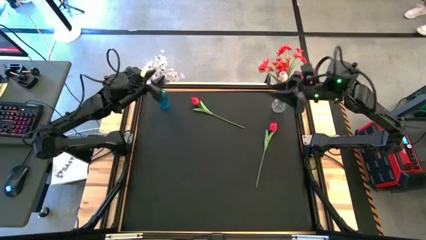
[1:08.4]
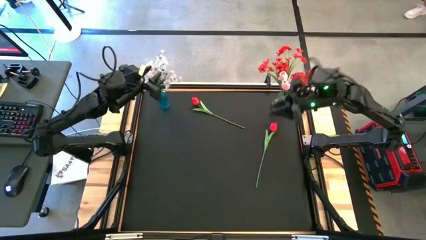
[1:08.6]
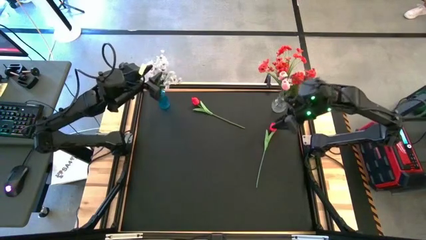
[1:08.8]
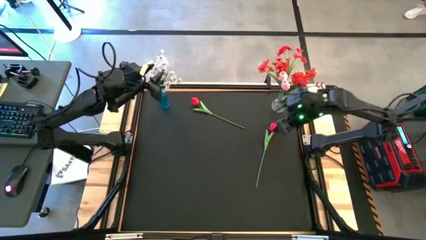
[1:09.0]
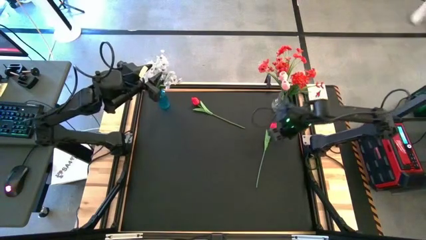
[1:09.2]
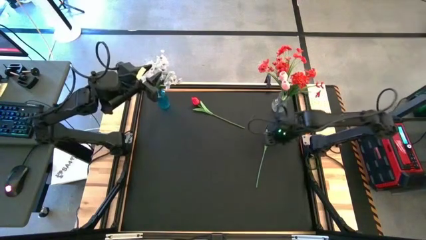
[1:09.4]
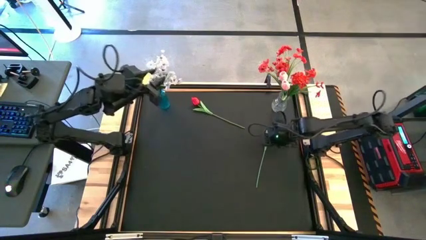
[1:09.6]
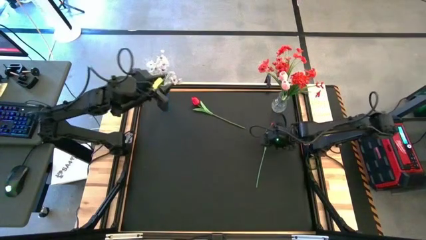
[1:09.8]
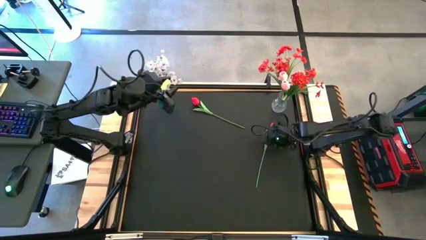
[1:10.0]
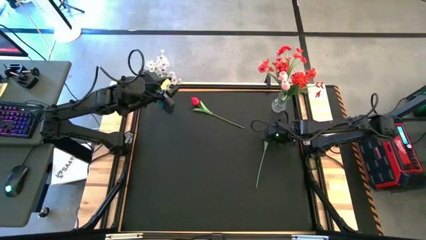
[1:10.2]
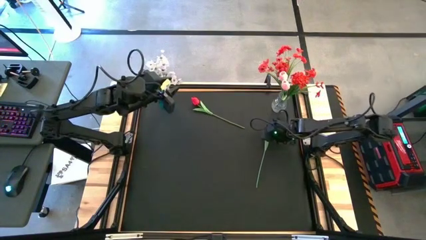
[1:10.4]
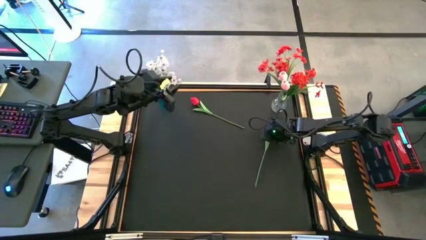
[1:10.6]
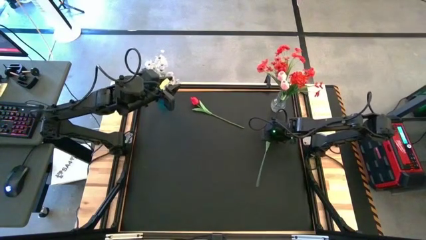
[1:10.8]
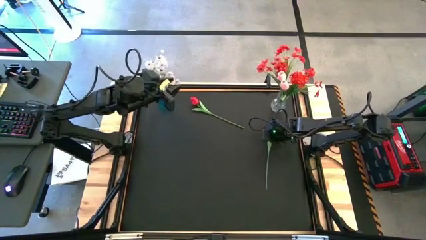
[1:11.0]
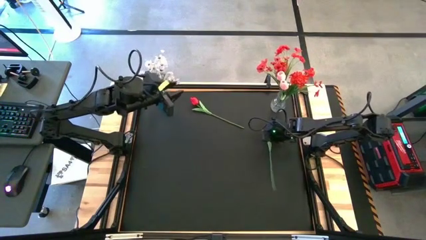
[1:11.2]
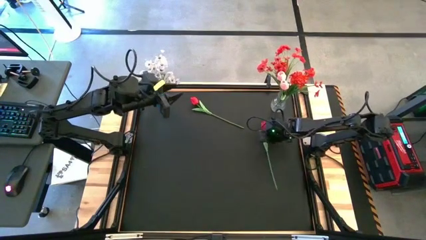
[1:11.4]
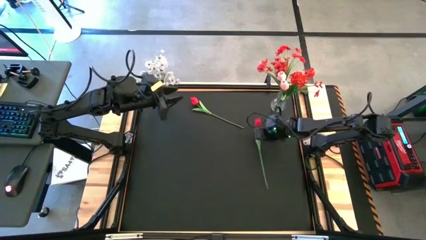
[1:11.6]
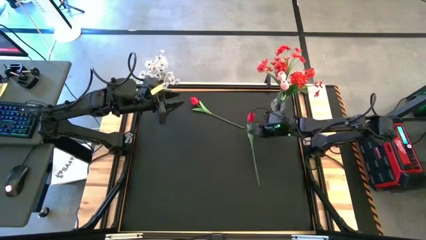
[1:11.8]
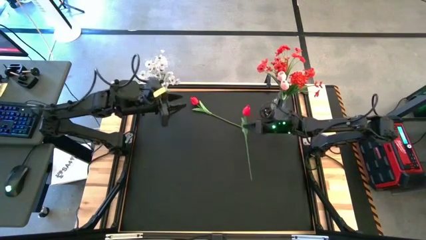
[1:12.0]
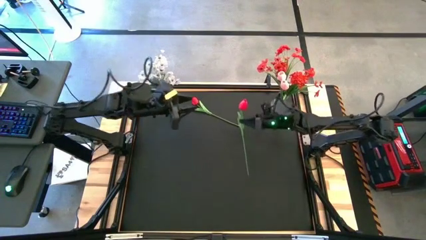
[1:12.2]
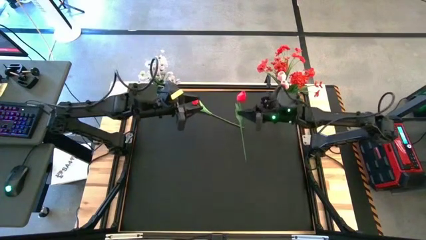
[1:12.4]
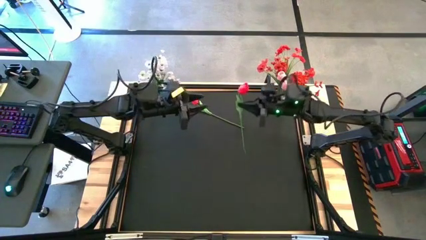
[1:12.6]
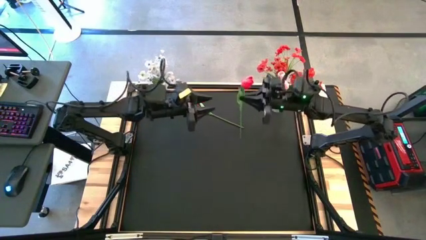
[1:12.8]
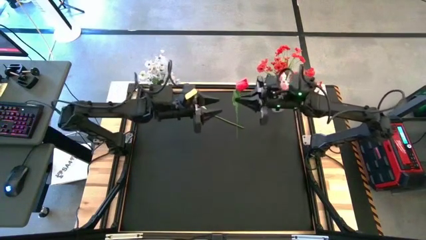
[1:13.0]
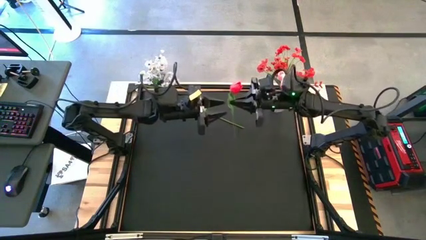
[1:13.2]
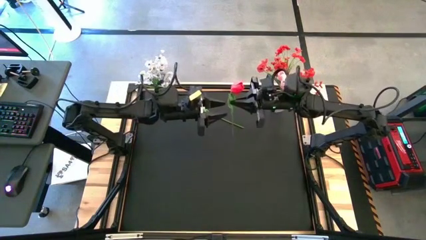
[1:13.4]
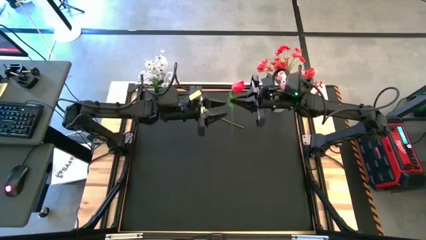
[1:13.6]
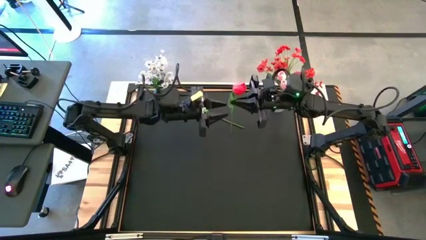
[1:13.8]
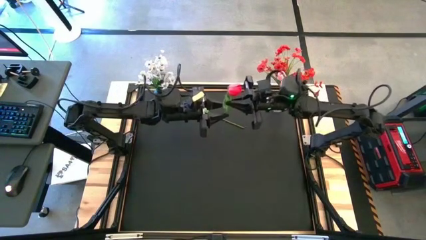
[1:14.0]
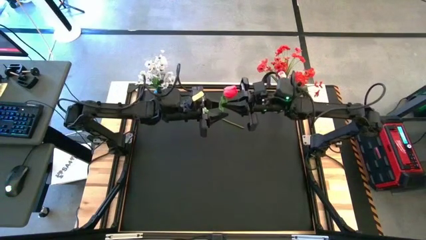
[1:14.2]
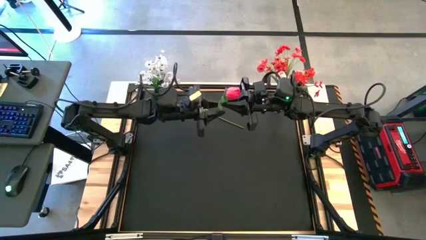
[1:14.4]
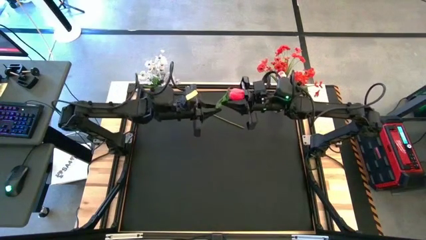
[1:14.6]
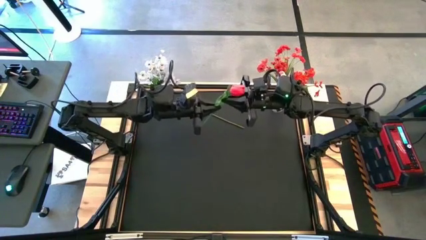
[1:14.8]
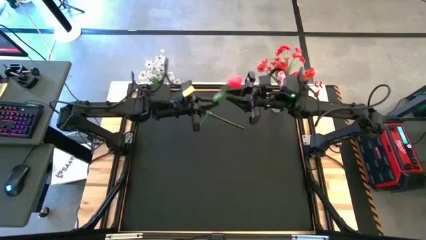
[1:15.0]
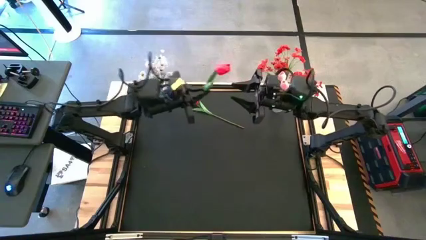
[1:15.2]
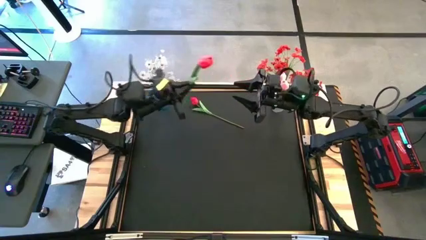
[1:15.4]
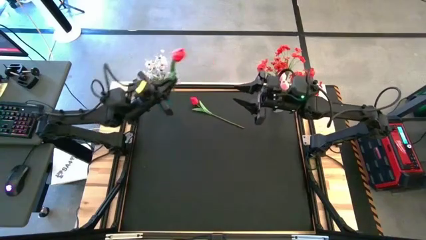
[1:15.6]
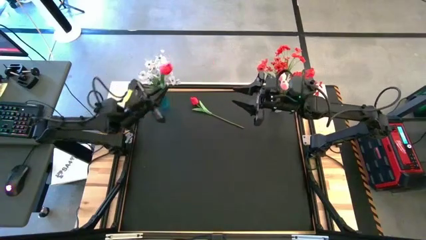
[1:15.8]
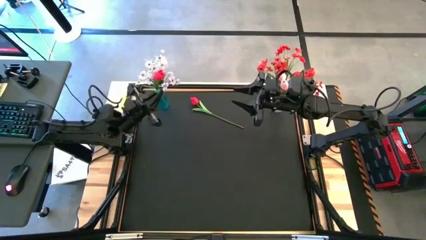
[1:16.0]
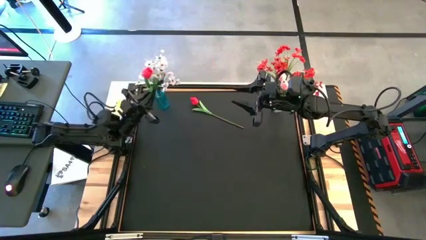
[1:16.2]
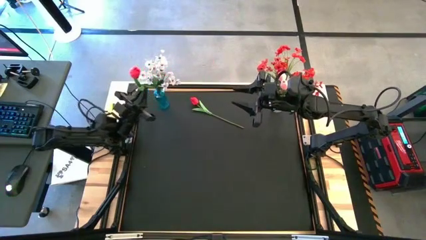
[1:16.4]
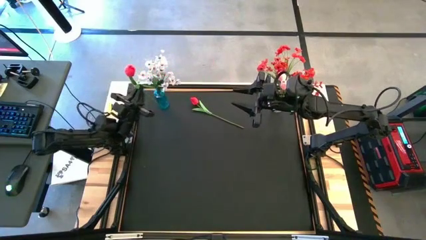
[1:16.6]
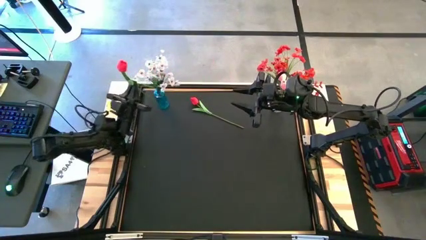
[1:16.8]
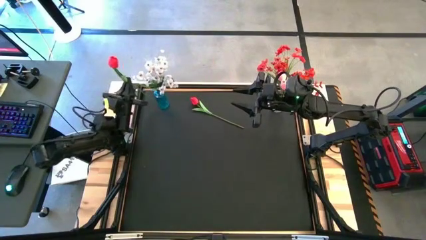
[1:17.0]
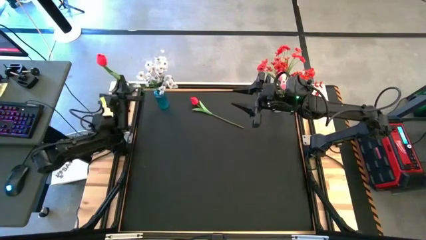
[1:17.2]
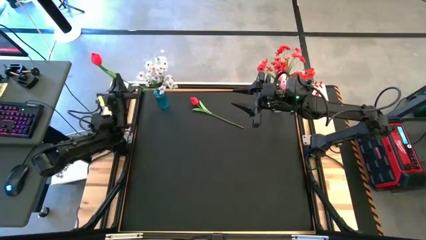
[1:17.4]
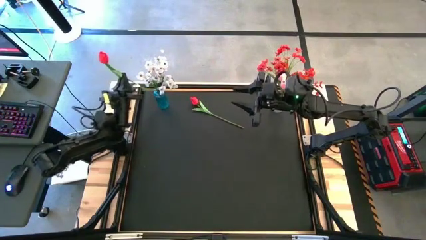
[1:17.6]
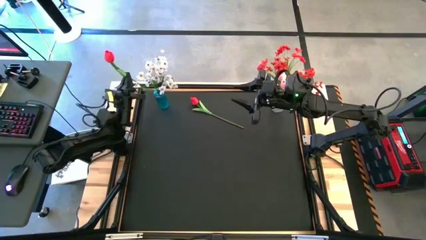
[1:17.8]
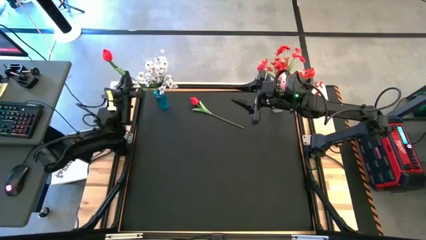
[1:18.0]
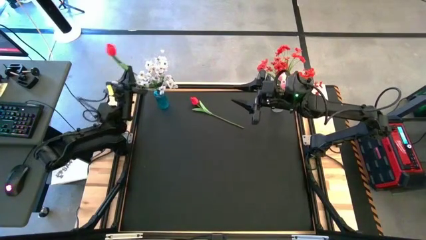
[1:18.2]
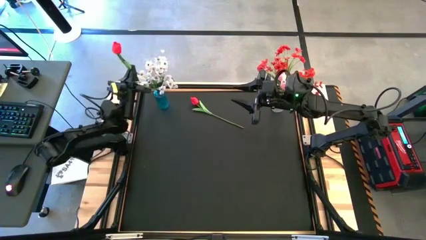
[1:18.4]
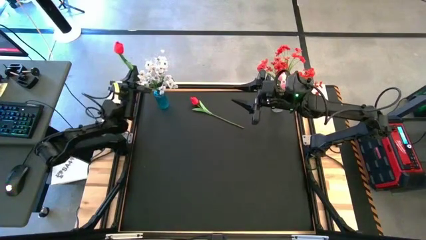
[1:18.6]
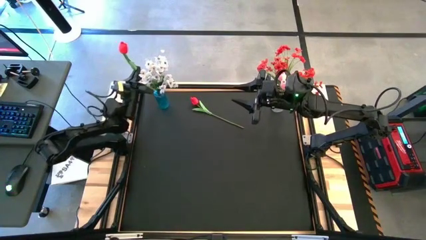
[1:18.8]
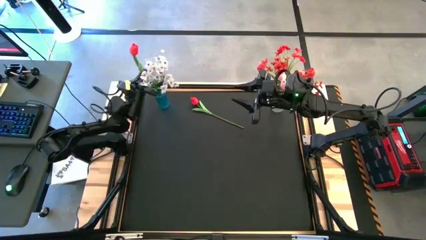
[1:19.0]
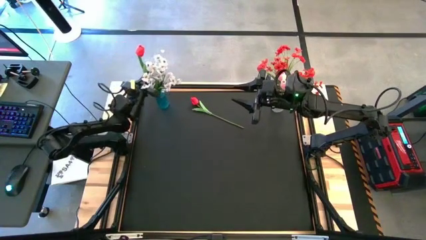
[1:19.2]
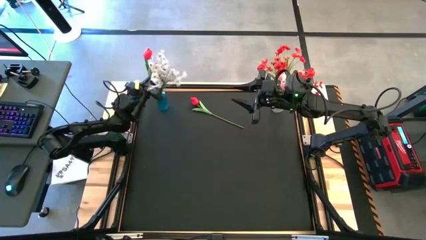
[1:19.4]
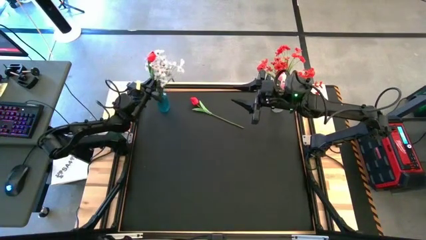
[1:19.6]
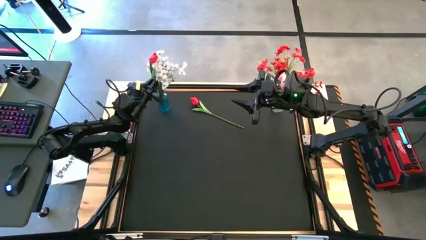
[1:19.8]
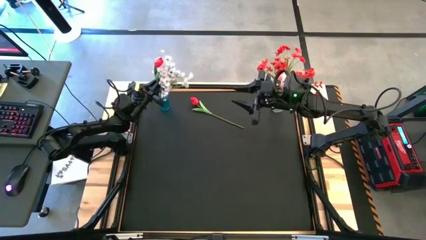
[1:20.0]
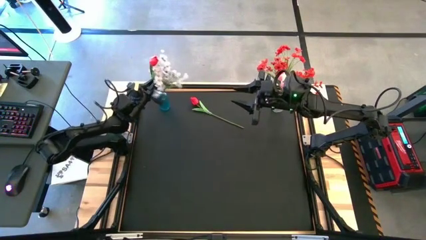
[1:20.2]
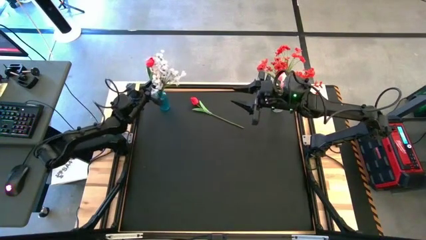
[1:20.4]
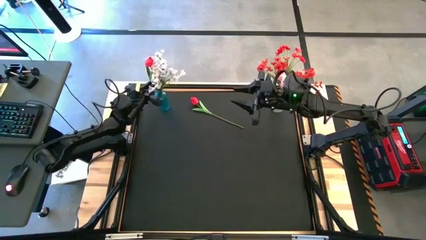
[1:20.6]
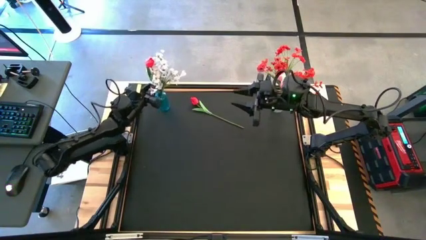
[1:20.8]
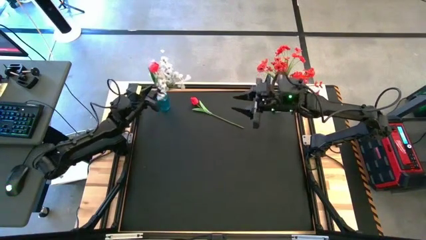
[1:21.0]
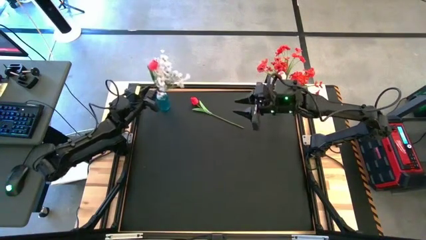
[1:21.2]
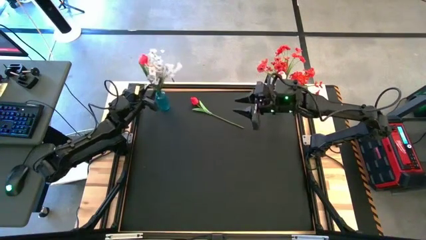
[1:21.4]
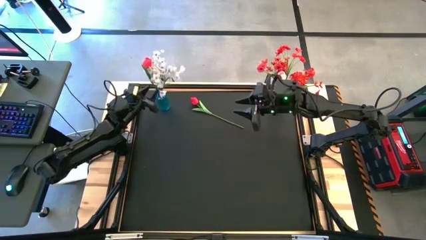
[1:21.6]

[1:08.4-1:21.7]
Task: Sort flowers into vase by color
Put the bottom red flower into the blue vase
